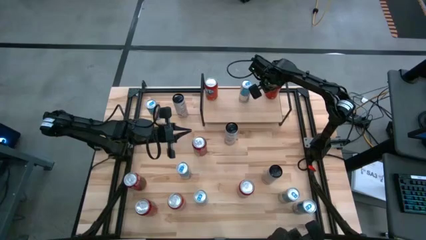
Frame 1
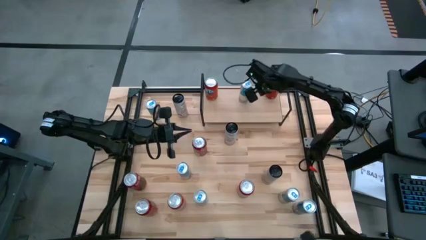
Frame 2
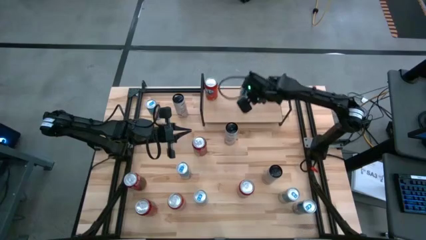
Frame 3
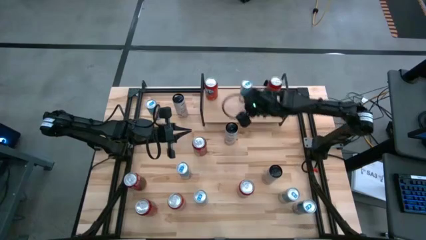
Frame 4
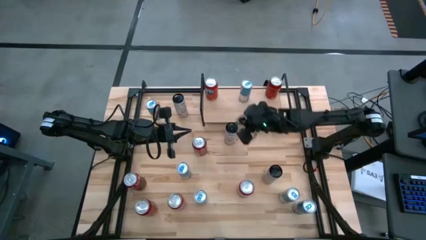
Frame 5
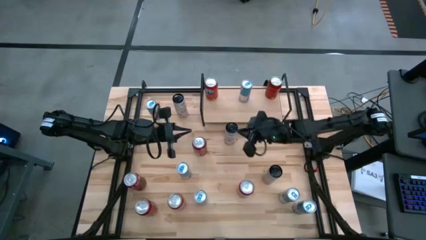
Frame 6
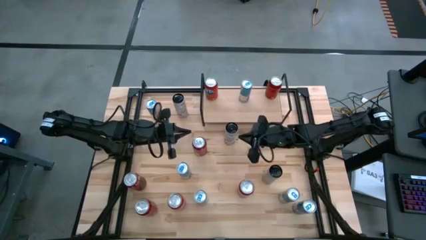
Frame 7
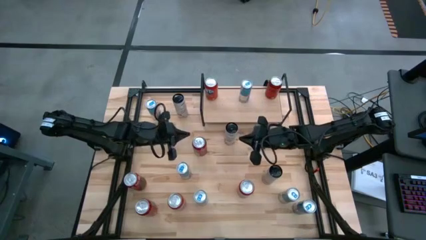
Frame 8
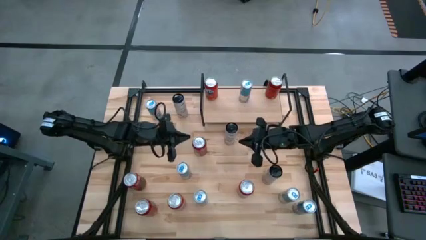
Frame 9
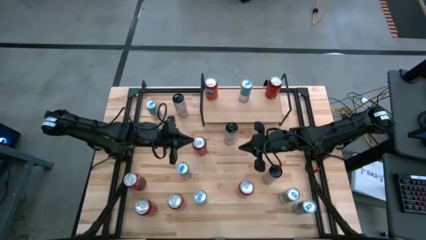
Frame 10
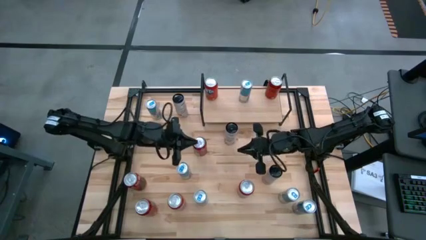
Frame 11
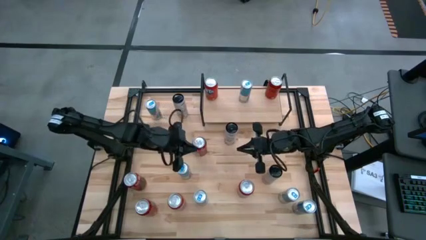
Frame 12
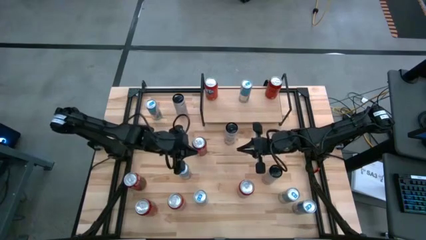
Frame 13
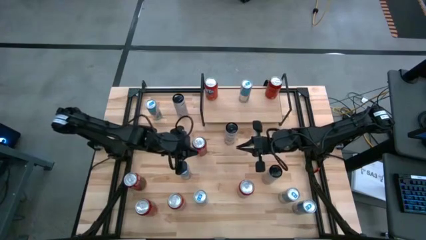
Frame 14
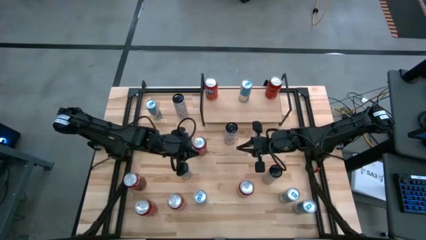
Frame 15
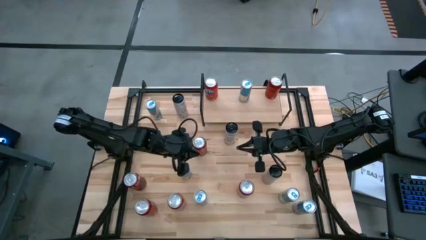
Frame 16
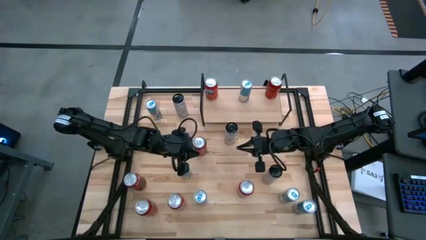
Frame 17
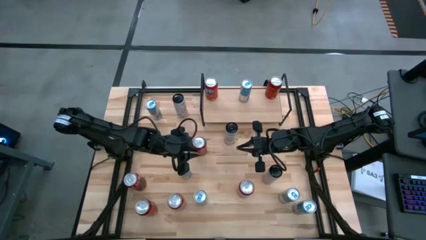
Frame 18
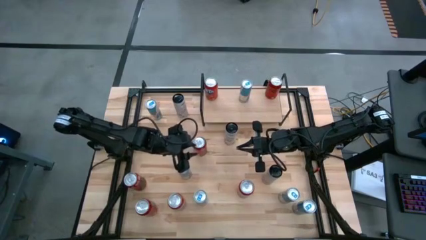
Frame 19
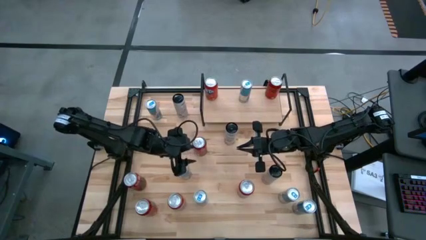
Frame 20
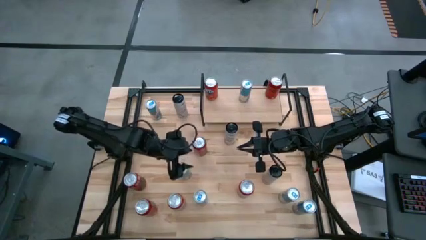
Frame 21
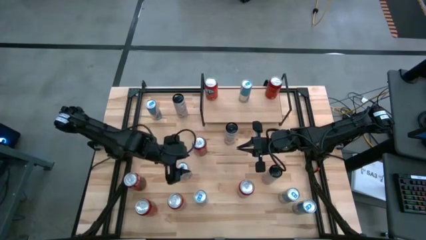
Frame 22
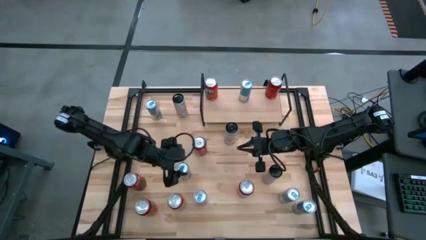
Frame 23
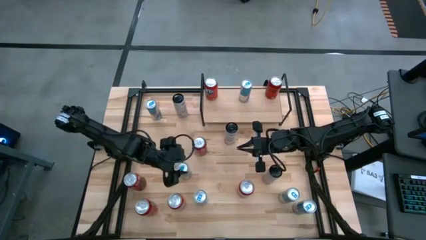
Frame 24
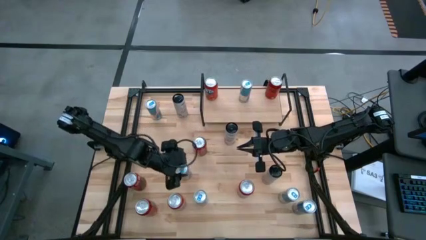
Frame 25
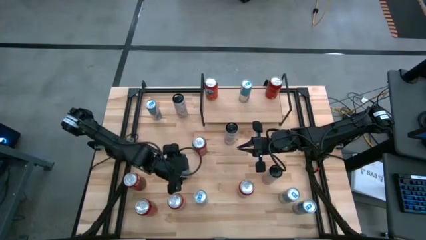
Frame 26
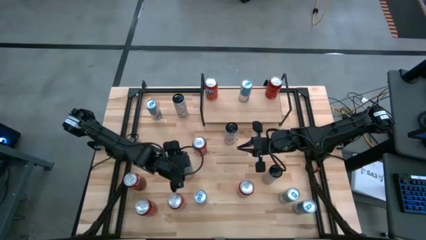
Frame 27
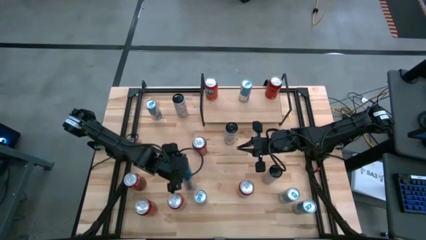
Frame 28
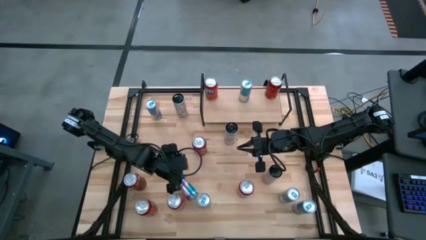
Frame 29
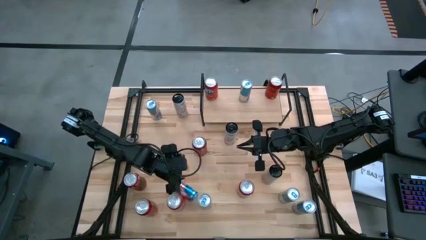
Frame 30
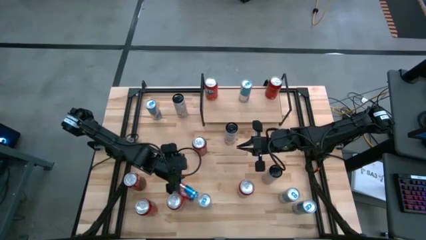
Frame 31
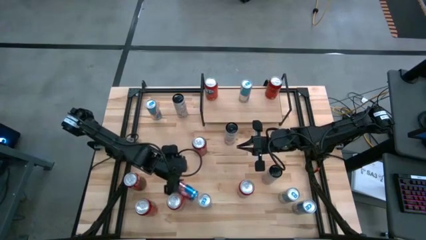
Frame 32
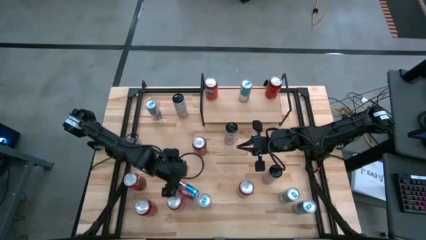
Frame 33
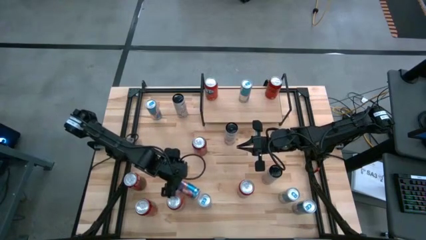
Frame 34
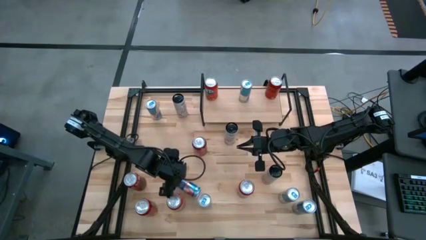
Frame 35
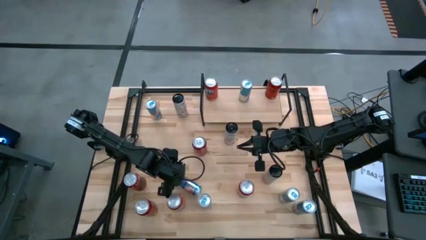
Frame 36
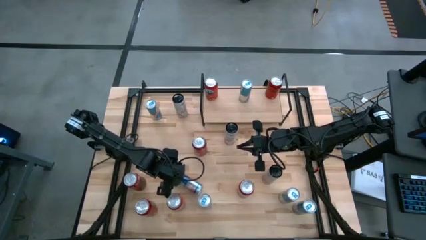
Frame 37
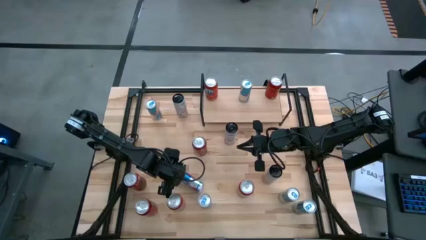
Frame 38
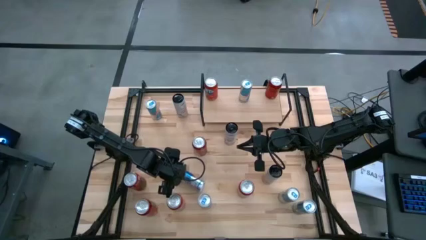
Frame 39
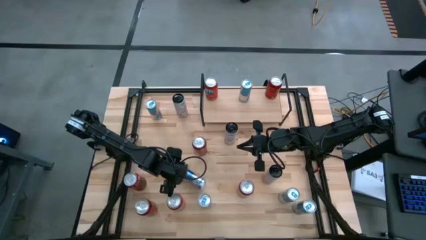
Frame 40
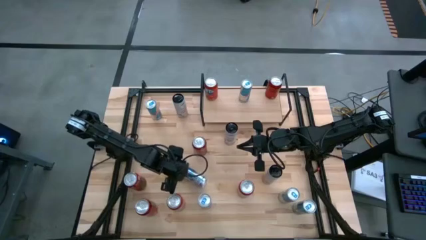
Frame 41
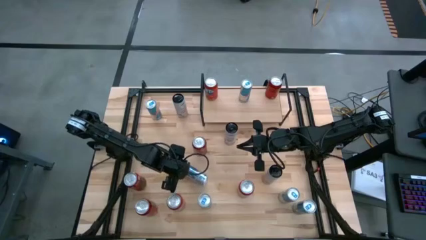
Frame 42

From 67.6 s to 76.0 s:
Task: Place canned beverage on shelf
Put the blue soda can on the shelf

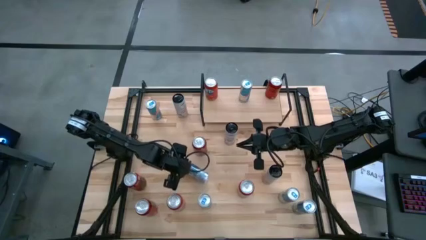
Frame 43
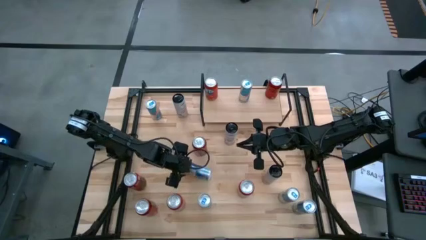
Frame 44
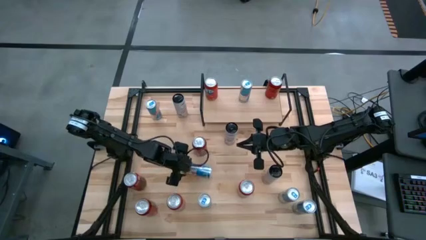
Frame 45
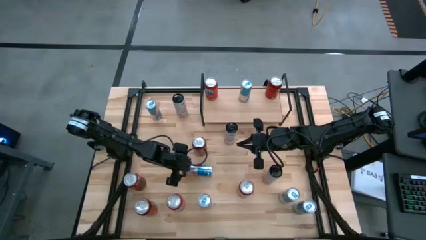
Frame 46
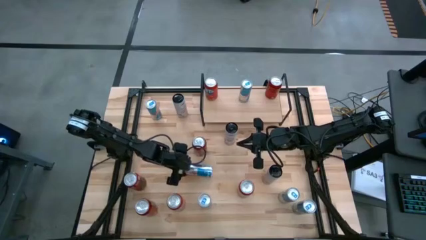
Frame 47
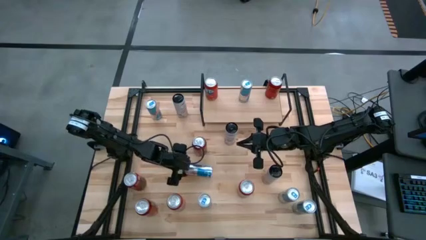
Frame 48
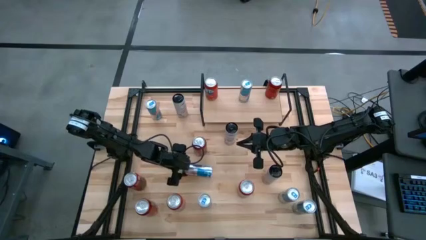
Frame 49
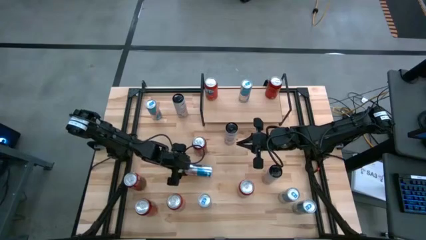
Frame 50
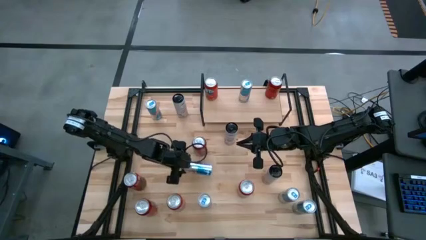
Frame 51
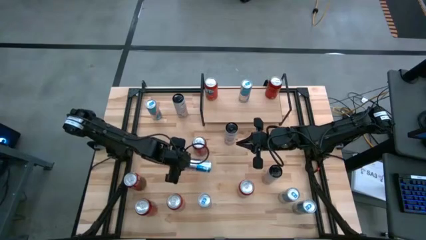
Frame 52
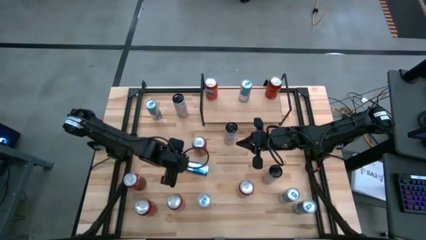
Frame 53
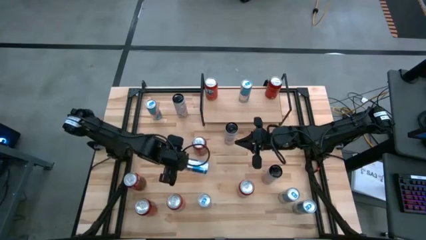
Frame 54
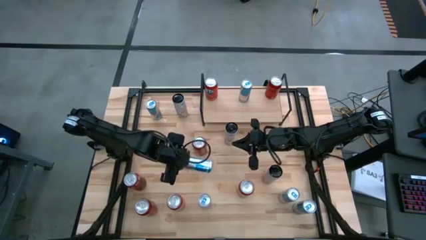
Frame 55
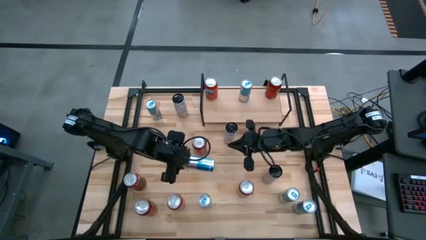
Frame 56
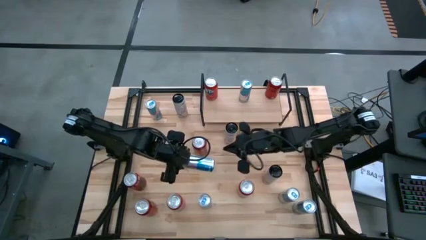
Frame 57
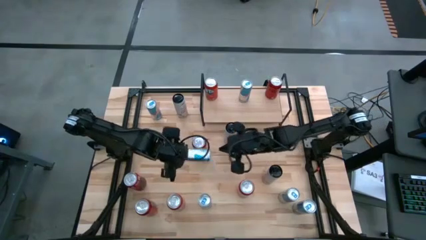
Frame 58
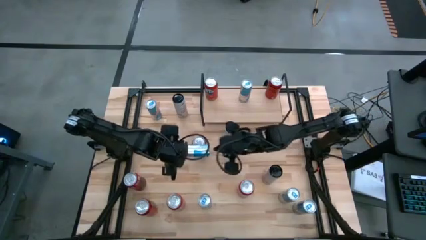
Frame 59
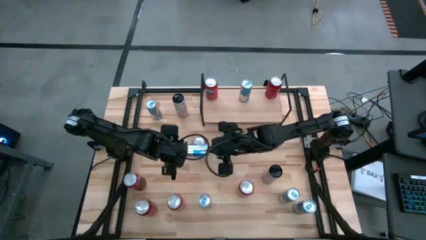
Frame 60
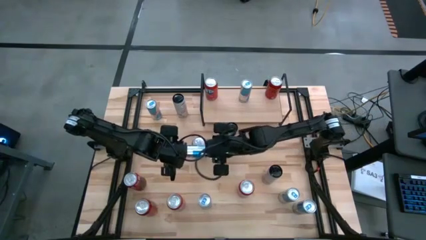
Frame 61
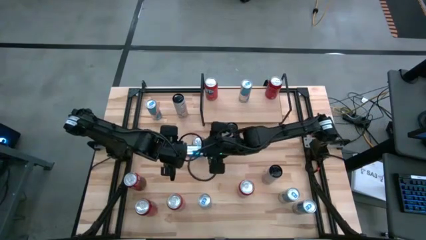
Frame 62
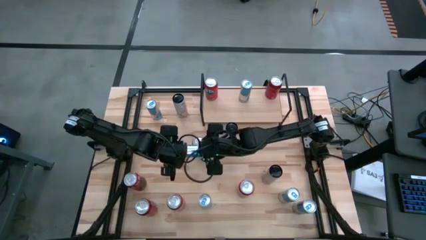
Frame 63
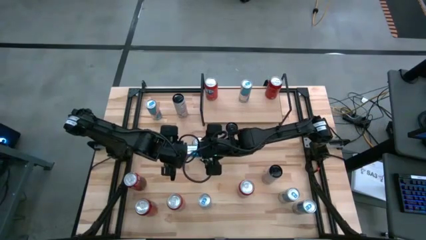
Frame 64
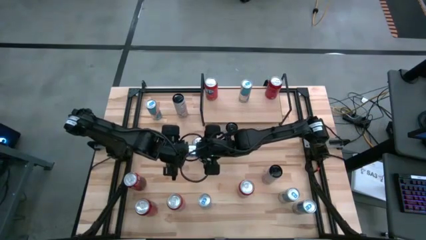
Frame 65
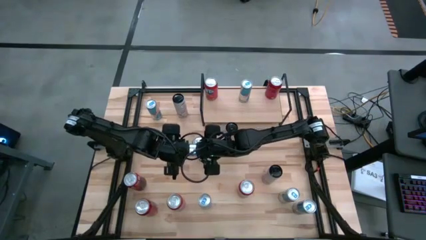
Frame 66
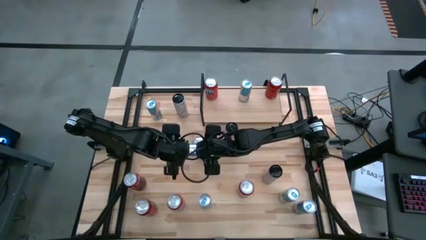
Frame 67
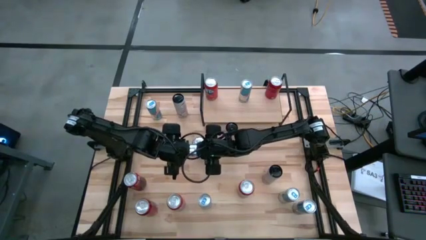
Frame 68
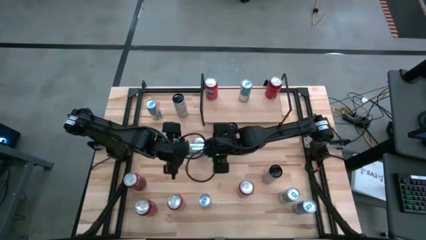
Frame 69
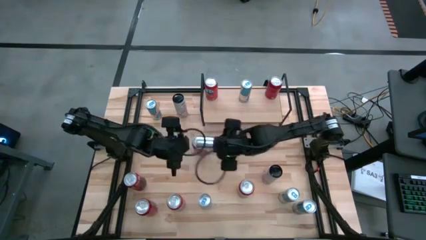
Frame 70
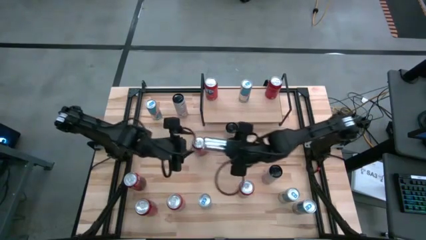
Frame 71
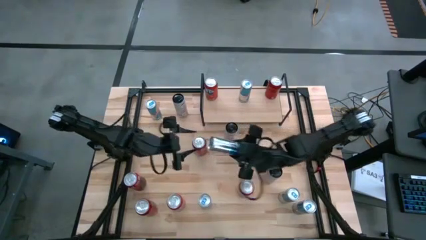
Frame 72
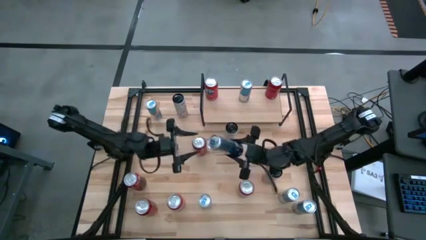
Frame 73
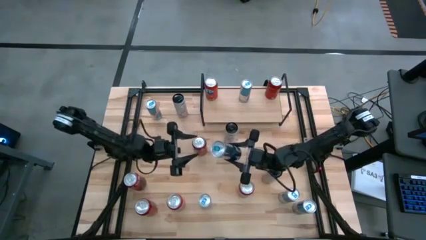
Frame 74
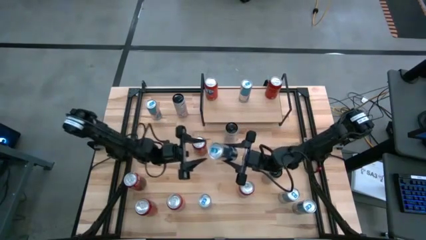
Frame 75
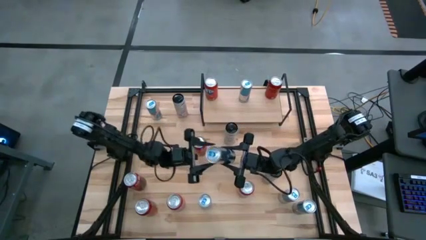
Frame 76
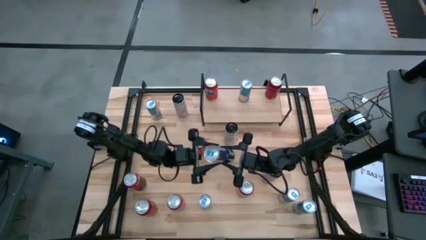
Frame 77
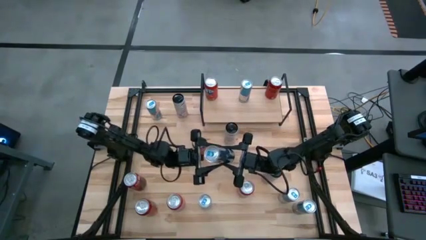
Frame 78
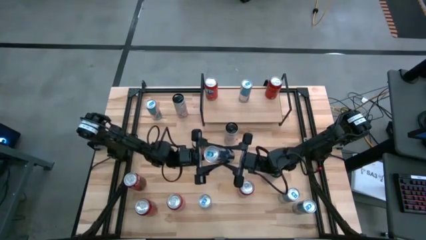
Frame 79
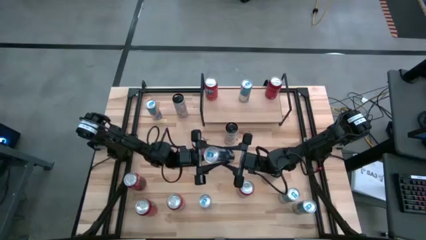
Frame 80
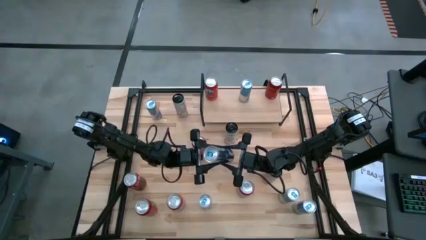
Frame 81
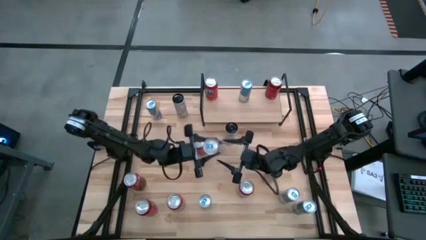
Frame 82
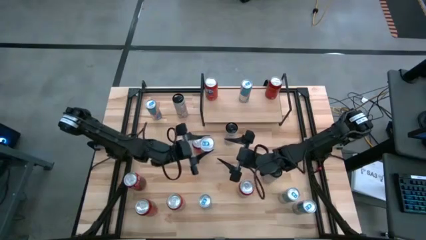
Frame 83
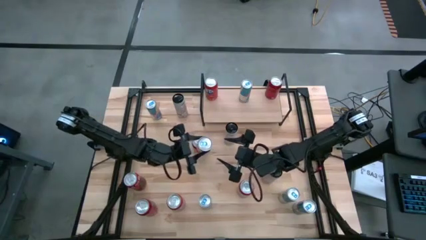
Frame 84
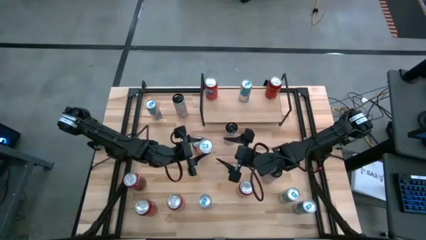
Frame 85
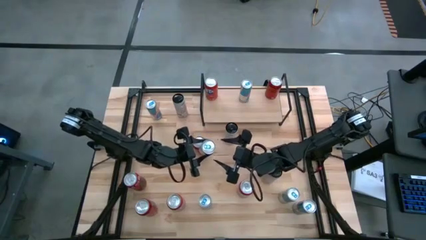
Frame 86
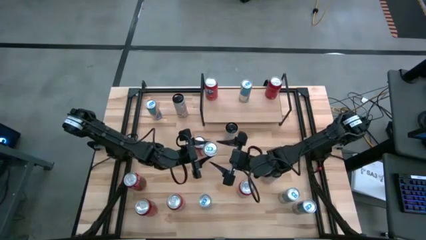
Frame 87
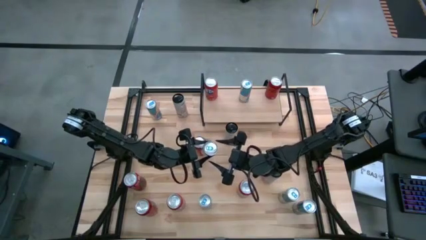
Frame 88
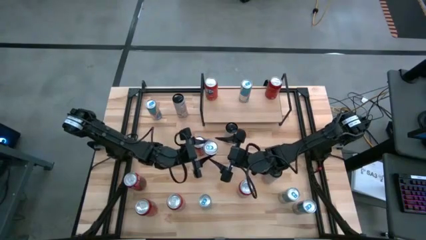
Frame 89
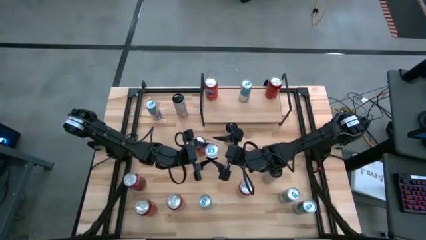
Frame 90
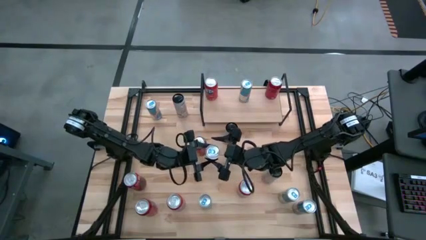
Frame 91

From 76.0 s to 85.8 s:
Put the blue soda can on the shelf
